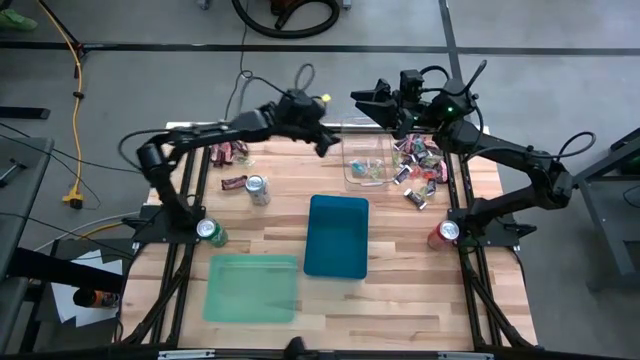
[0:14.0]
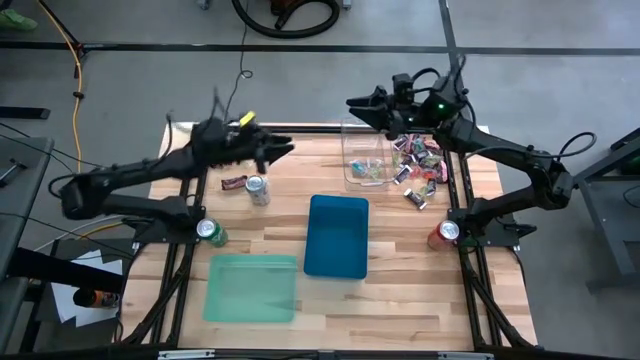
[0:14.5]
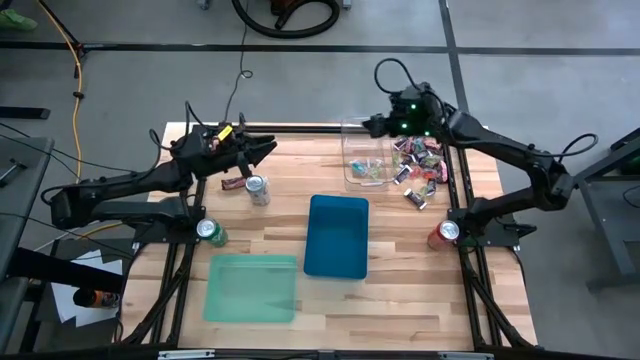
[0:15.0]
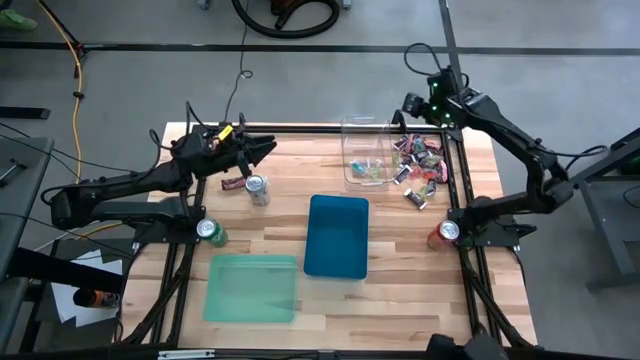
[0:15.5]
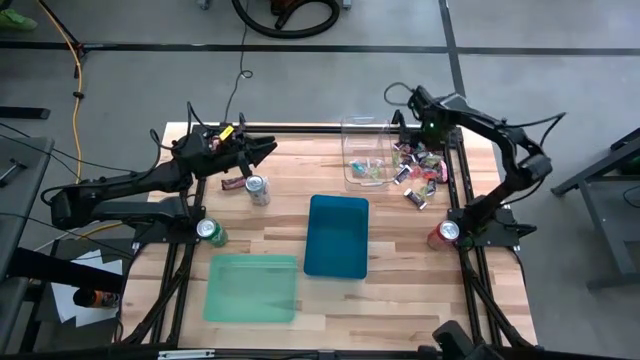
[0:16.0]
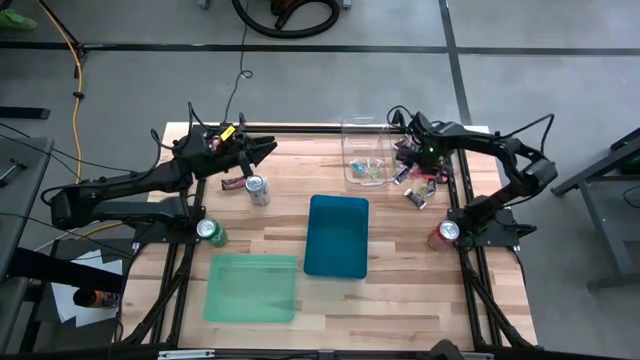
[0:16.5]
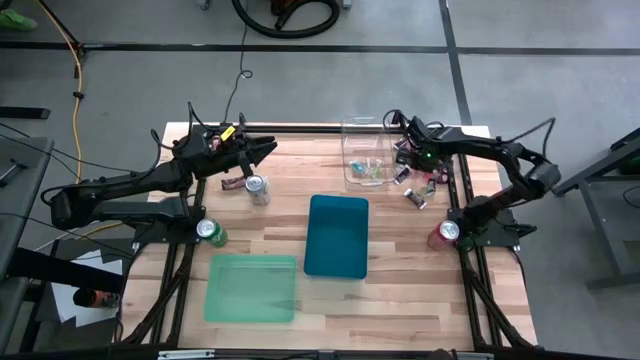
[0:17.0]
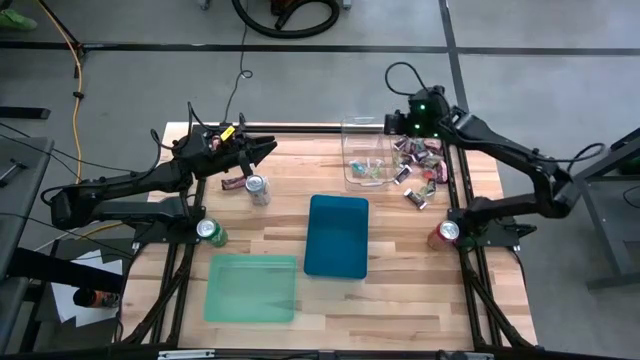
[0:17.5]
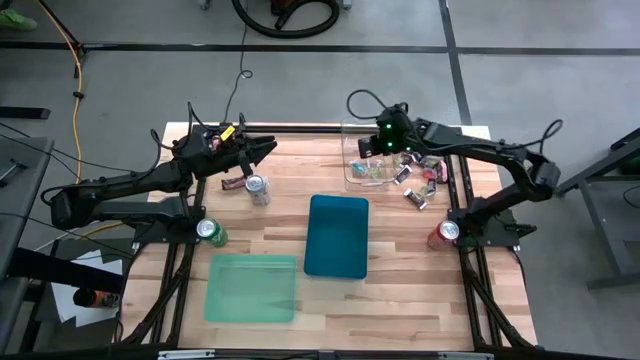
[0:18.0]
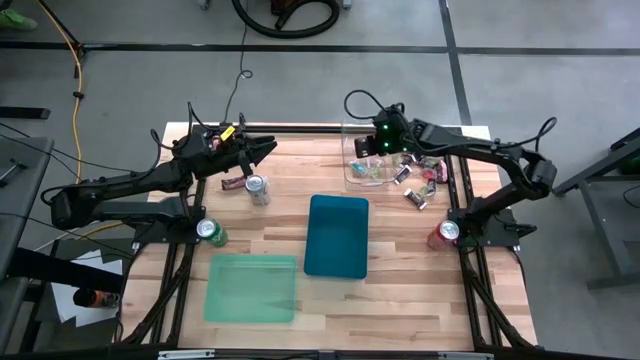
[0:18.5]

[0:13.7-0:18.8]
Task: Sort candy
Put the red gummy into the transparent bin

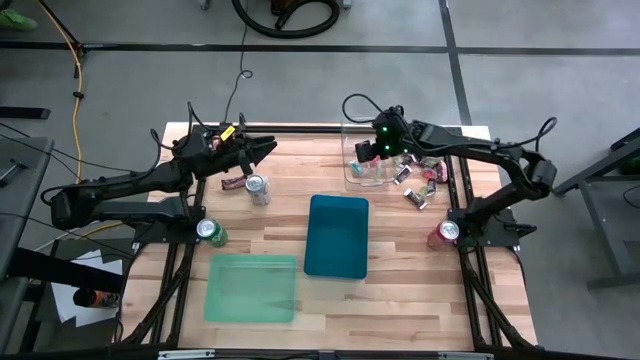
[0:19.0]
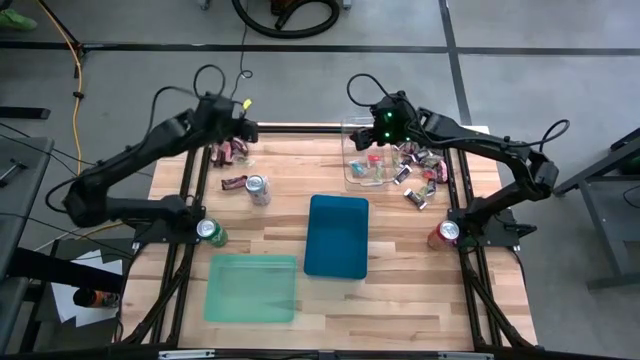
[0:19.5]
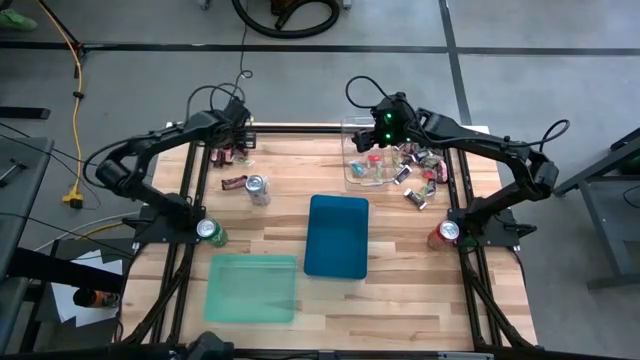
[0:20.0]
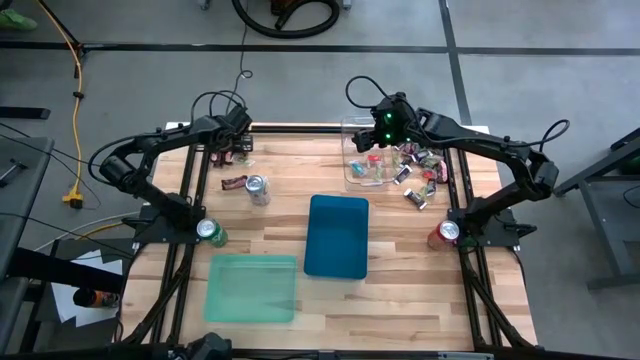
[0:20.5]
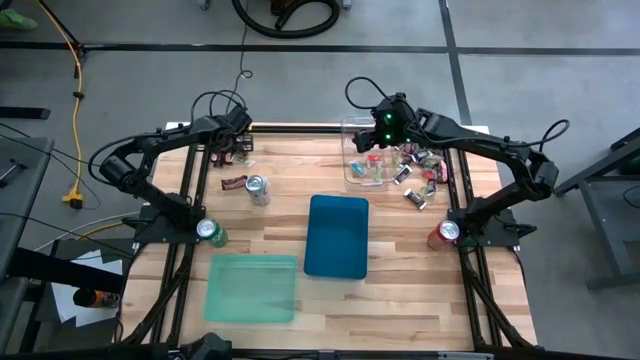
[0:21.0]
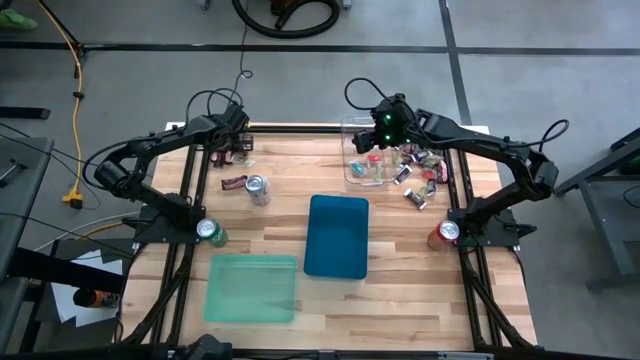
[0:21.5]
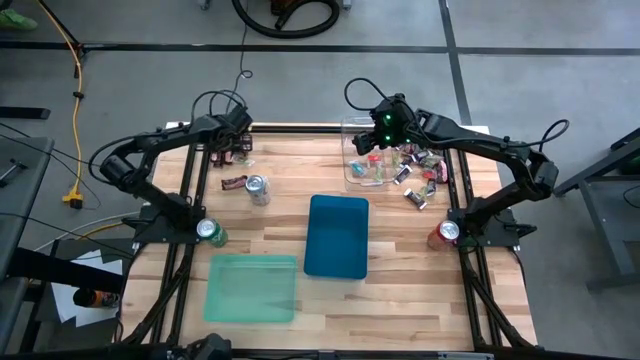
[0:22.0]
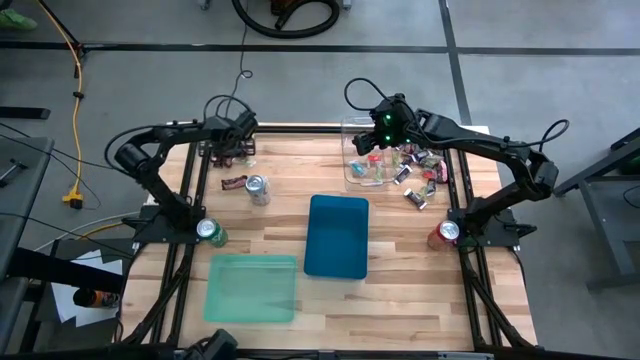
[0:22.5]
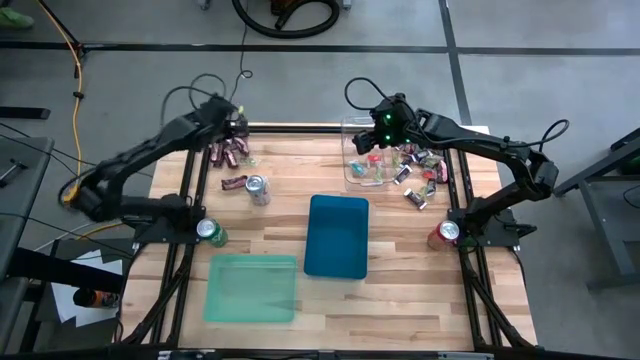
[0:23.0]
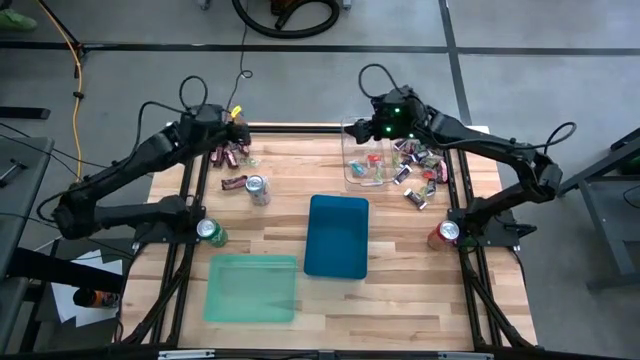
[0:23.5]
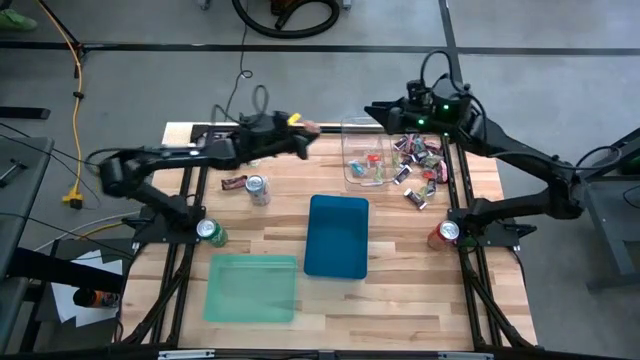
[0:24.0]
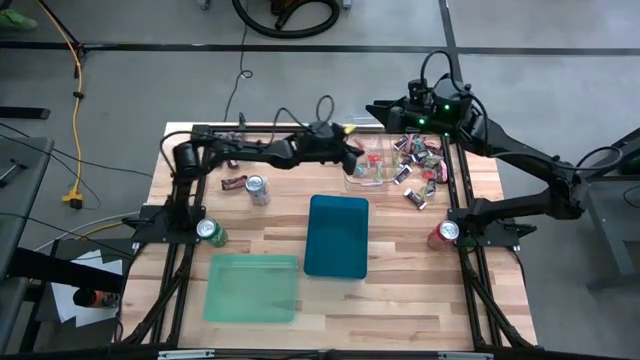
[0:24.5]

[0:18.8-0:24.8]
Put the orange gummy into the transparent bin

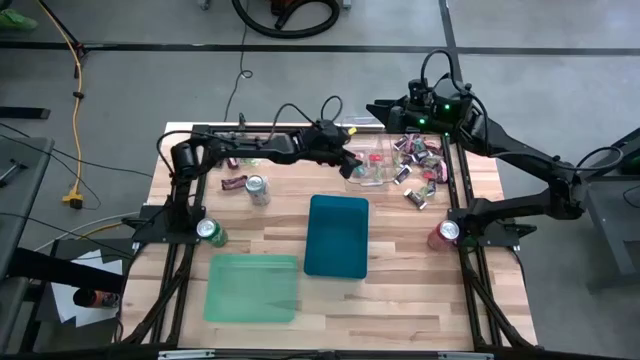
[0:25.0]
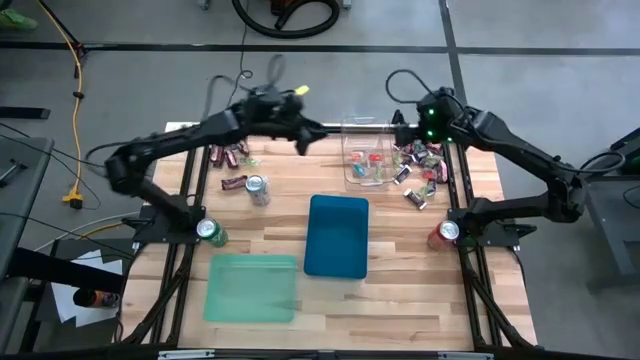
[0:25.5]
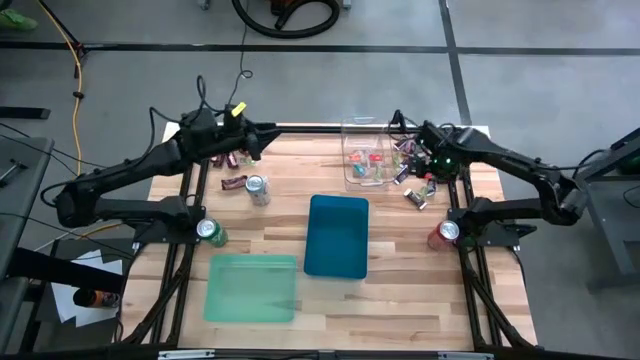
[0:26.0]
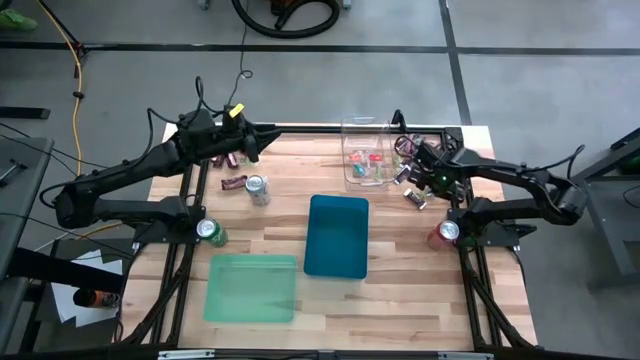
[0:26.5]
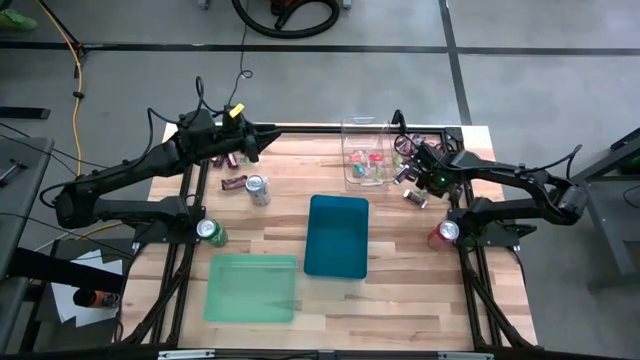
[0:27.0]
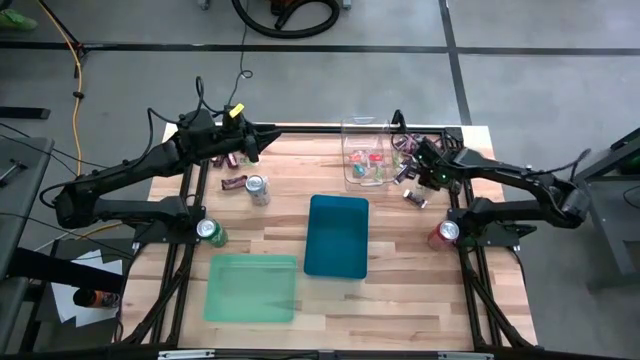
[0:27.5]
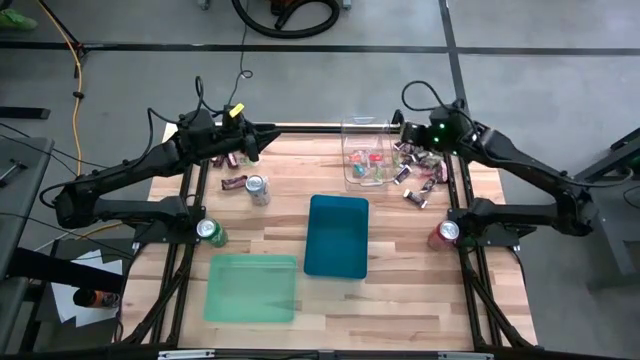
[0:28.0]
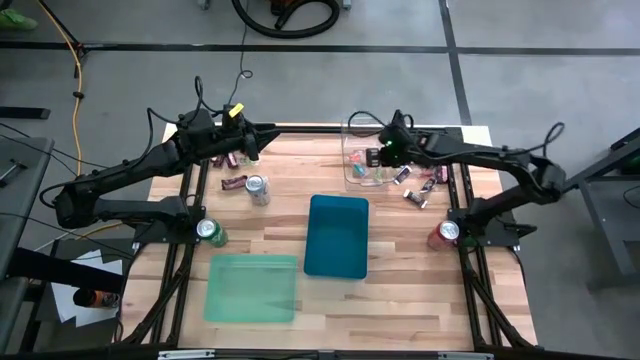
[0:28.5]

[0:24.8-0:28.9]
Put the green gummy into the transparent bin

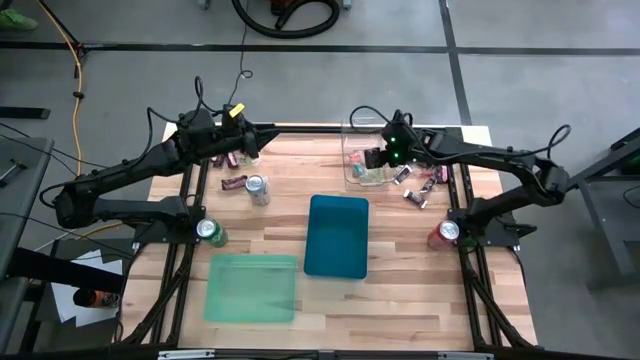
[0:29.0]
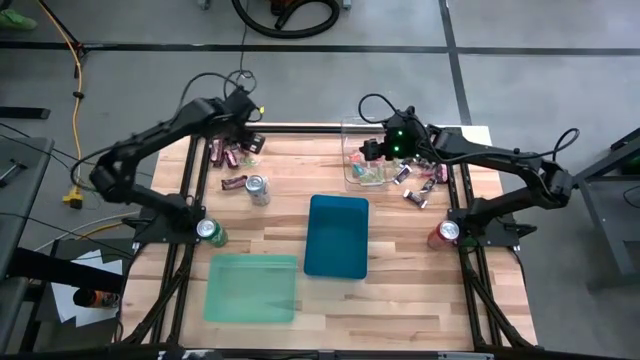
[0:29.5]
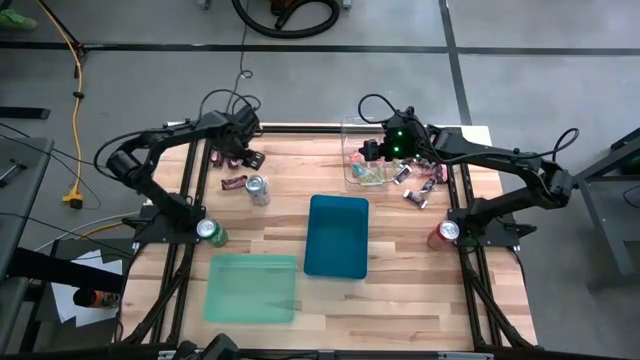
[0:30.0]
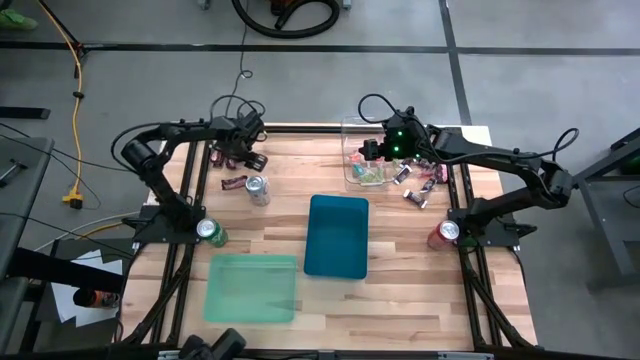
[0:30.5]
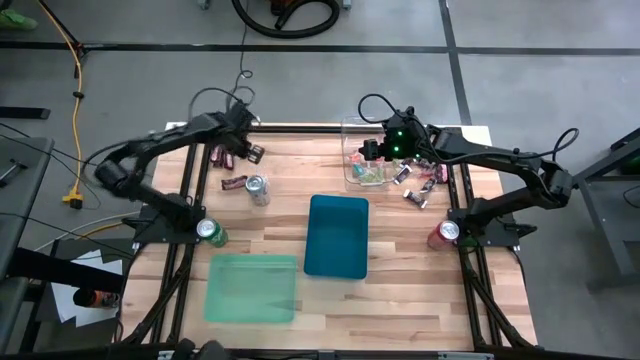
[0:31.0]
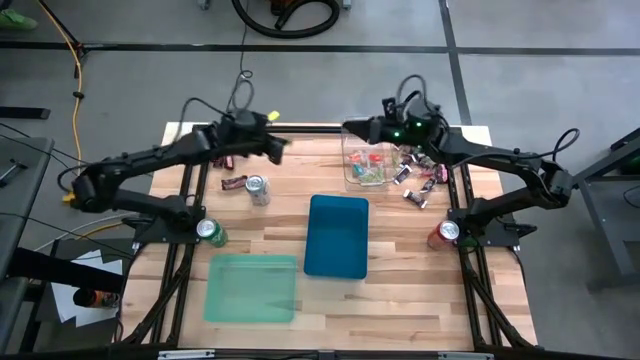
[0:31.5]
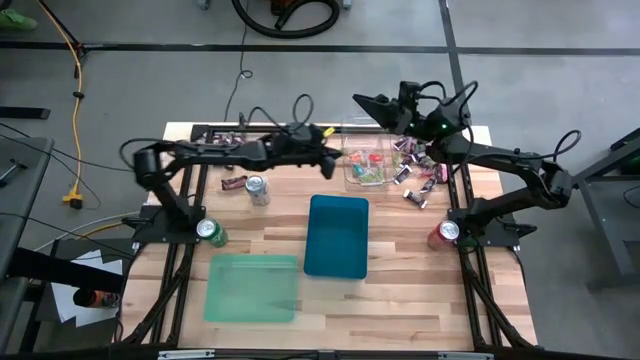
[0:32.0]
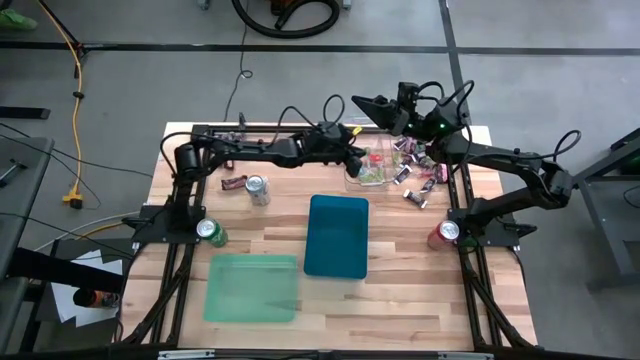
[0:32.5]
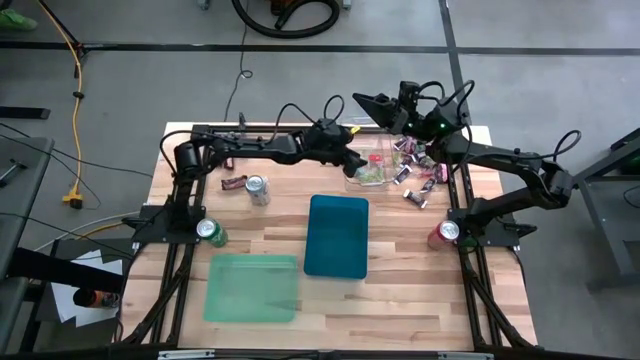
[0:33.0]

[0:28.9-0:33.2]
Put the green gummy into the transparent bin

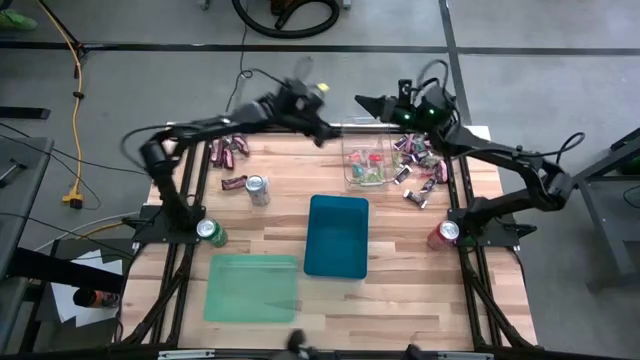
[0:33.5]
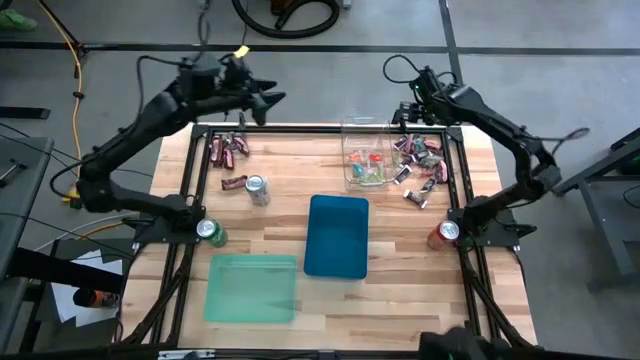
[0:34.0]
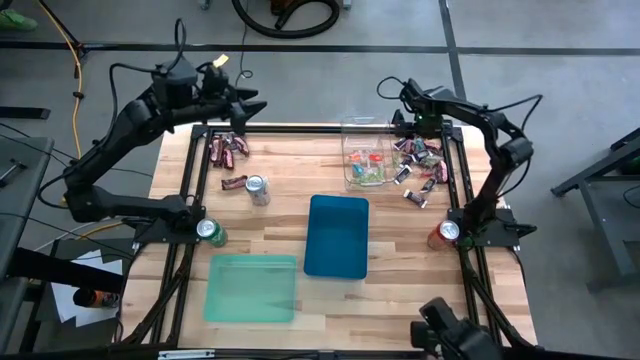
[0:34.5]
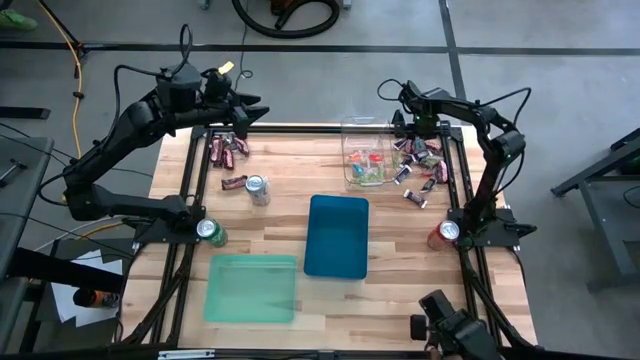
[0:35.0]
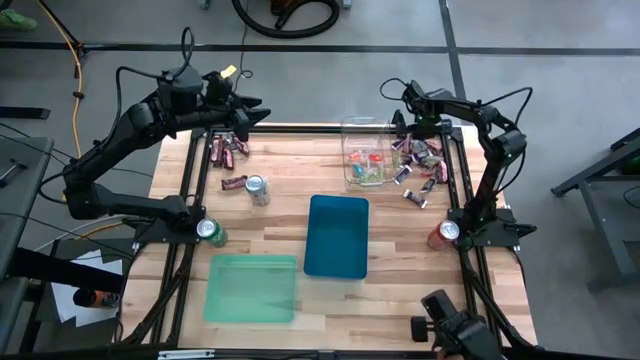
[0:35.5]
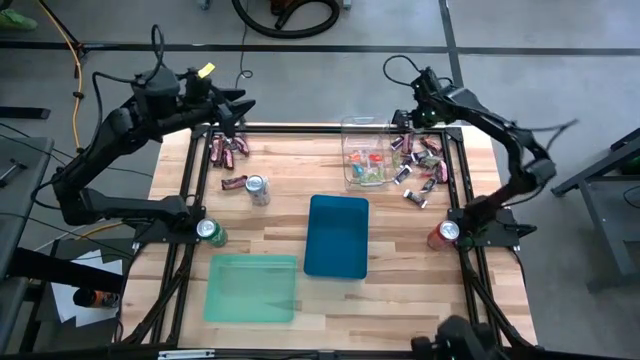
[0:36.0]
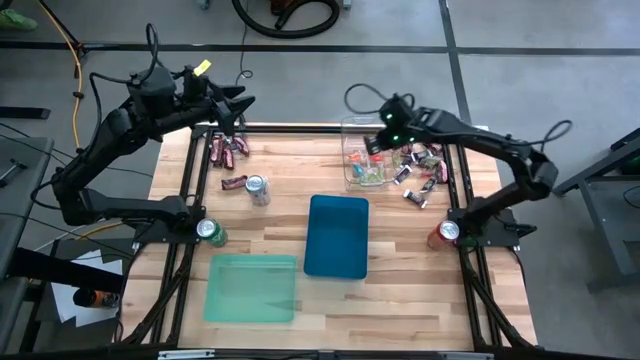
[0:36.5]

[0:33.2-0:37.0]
Put the blue gummy into the transparent bin
